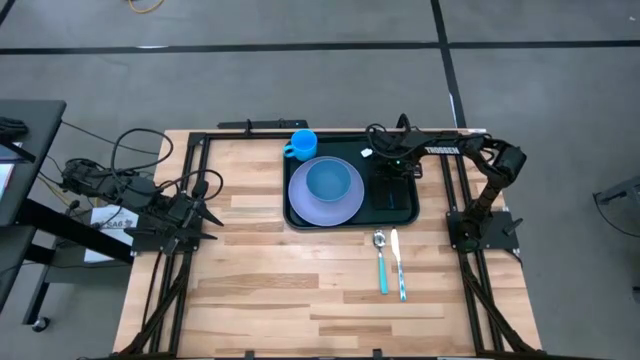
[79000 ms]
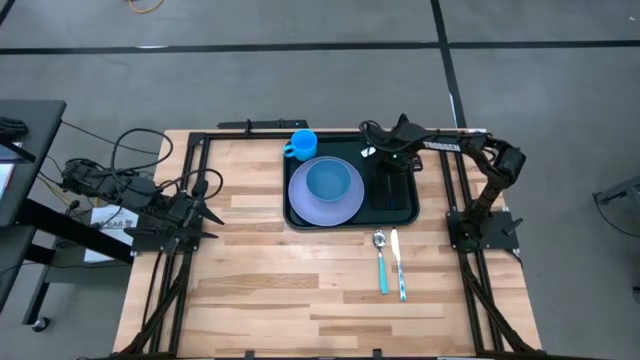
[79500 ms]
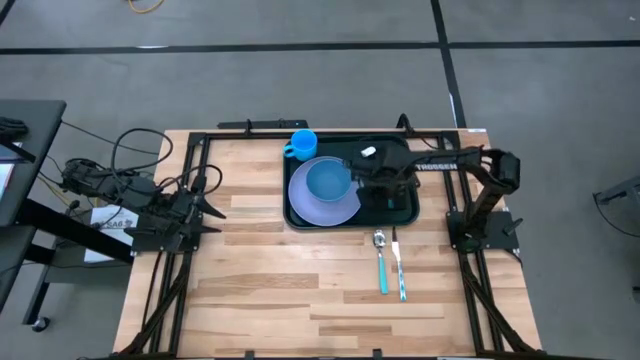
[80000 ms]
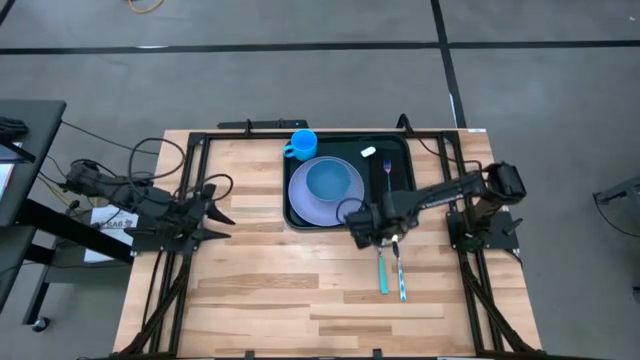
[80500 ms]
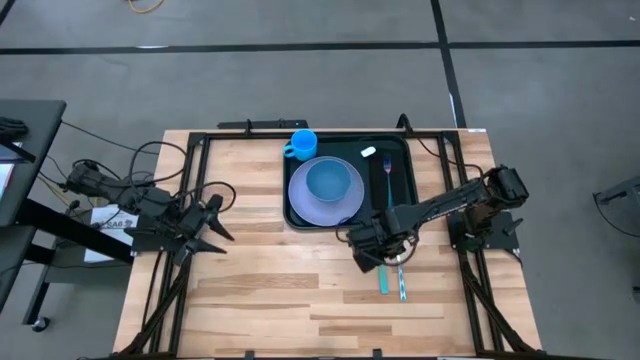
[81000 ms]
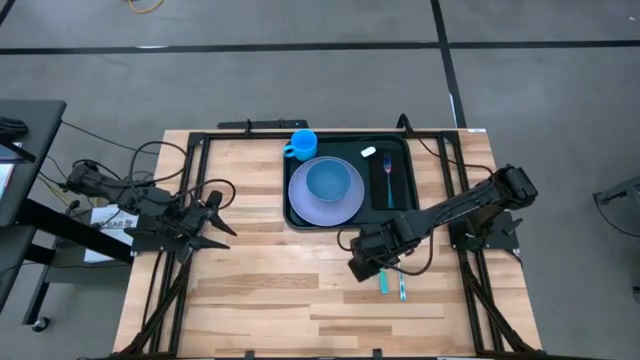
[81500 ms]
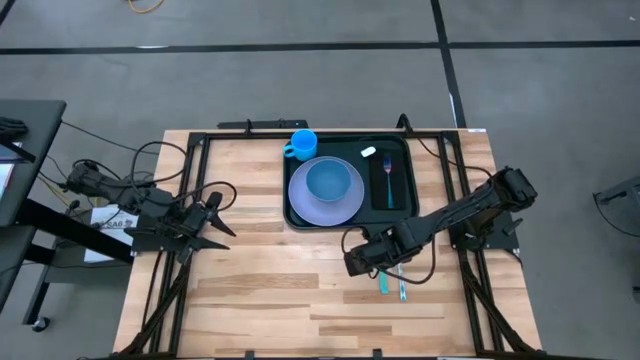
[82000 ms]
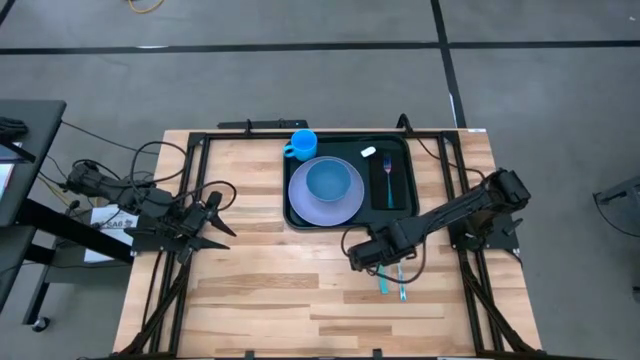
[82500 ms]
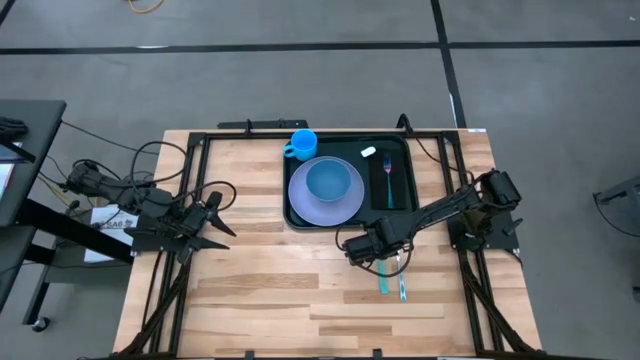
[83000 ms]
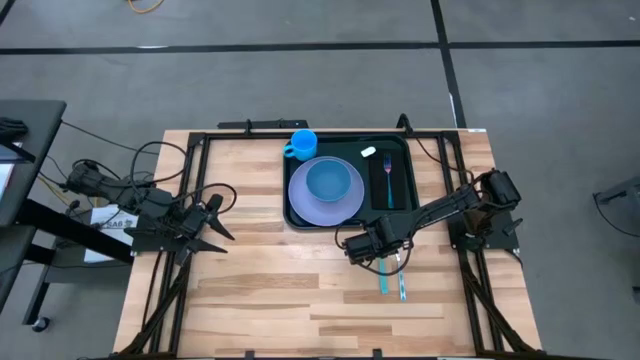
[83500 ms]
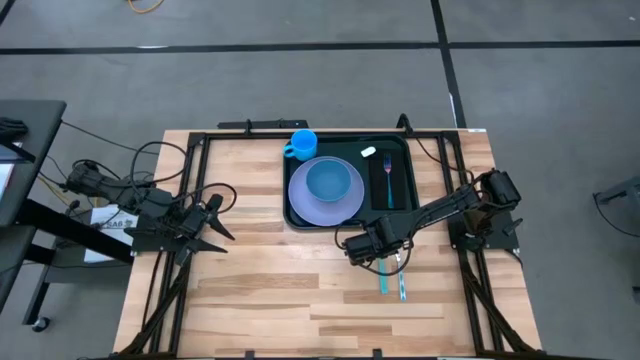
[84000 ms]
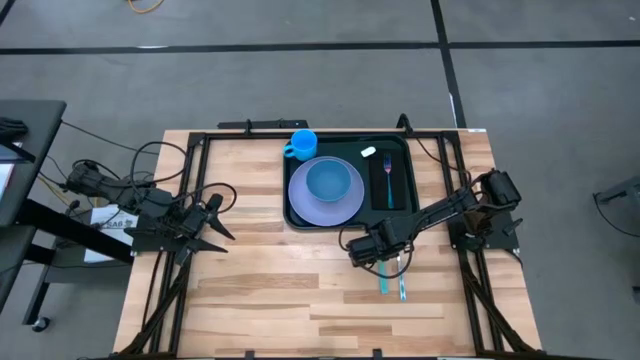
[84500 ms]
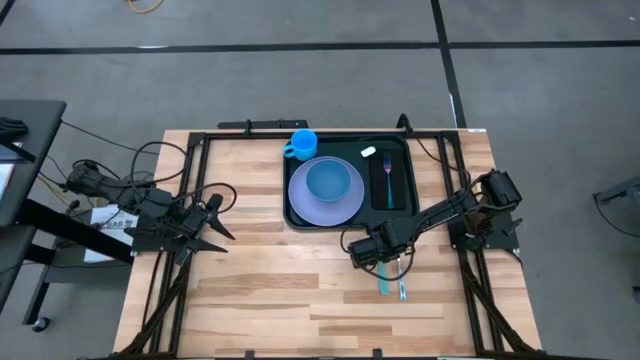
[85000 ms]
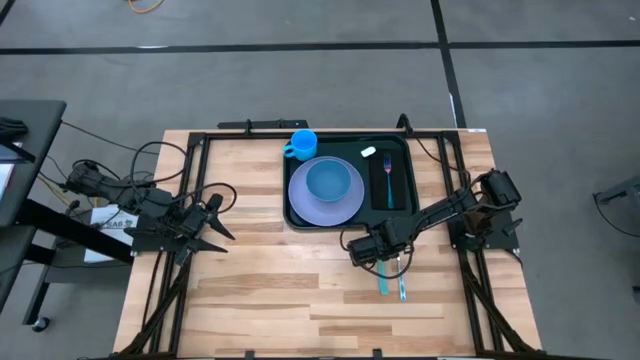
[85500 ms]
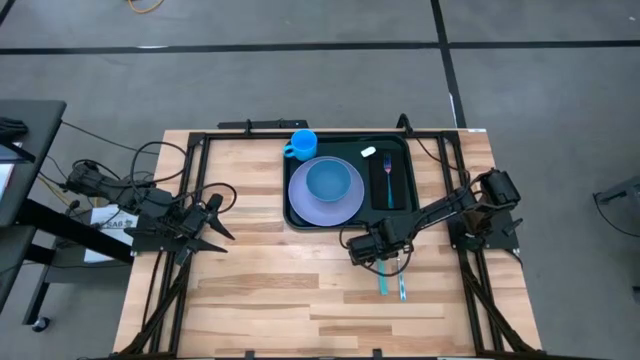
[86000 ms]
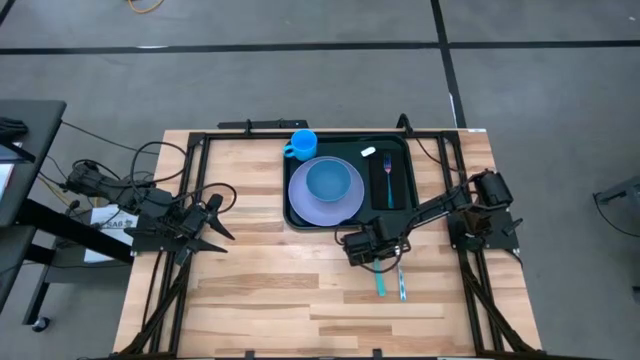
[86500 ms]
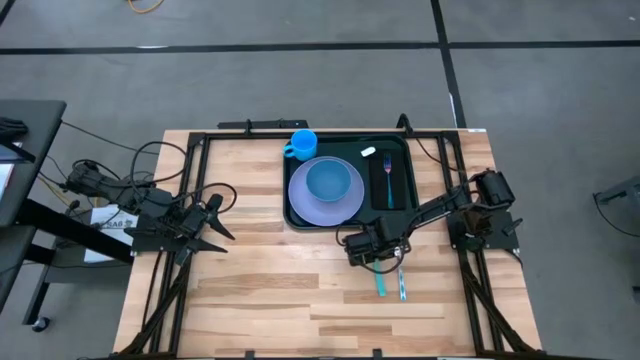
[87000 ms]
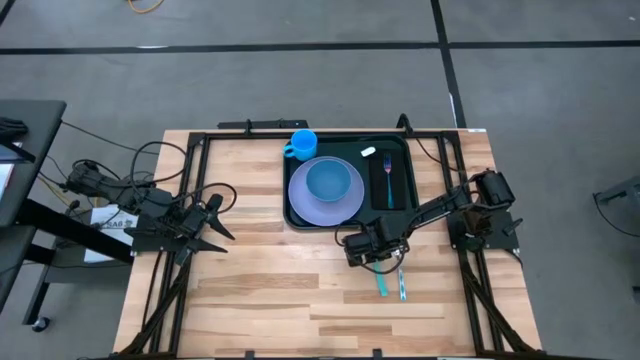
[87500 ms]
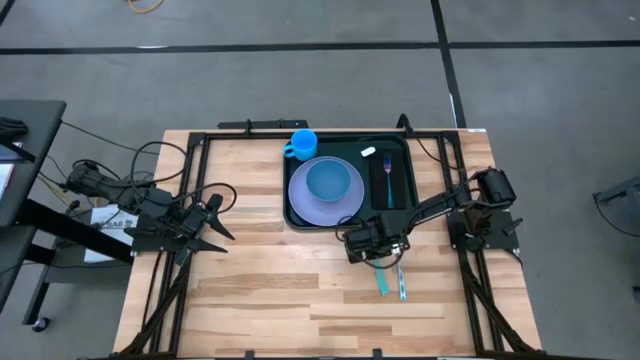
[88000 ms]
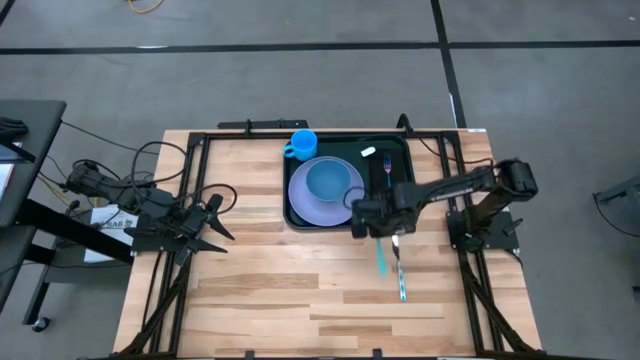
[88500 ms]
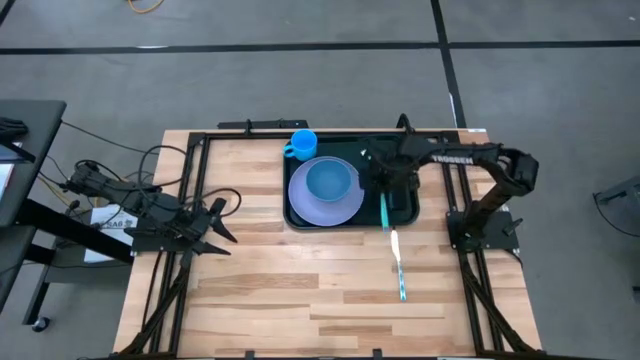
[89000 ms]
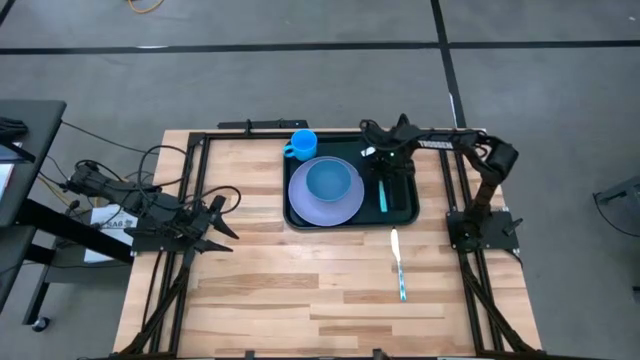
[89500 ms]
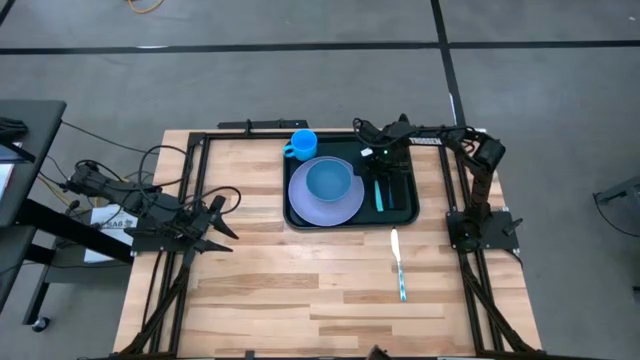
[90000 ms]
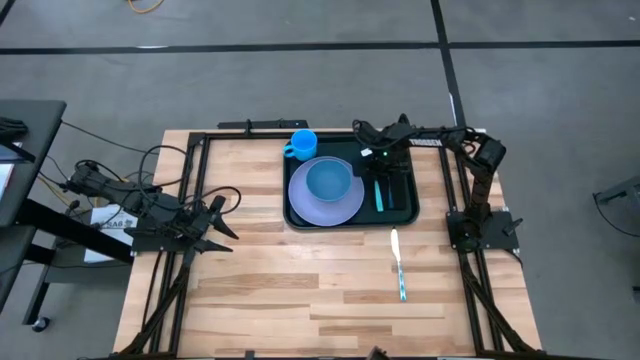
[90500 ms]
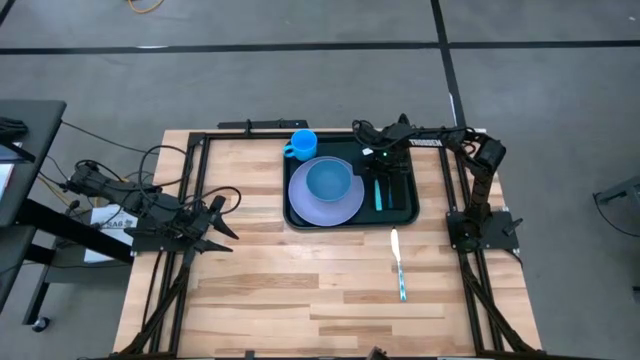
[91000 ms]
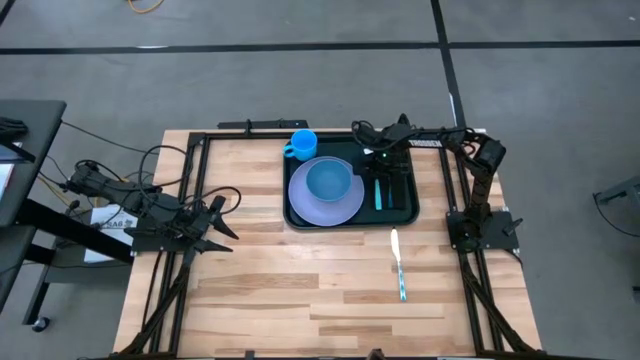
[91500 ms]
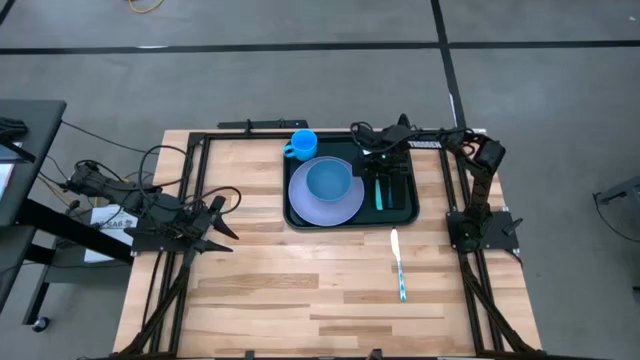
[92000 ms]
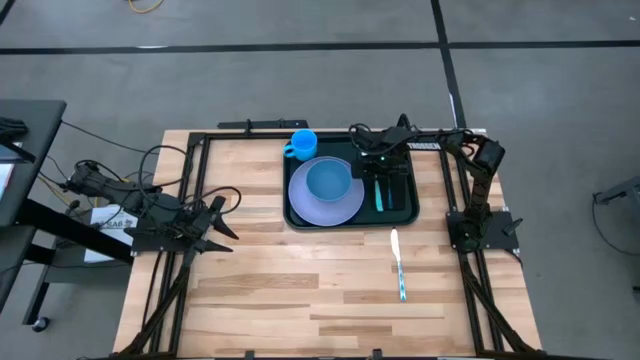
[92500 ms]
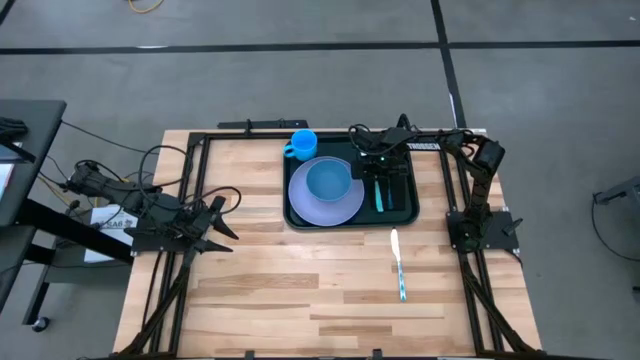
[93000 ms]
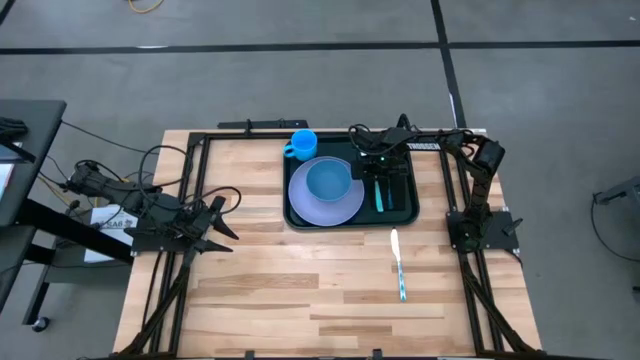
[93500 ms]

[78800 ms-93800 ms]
Task: Set up tray
Put the blue spoon on the black napkin

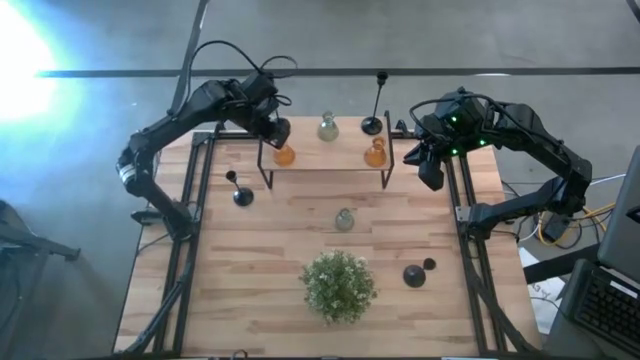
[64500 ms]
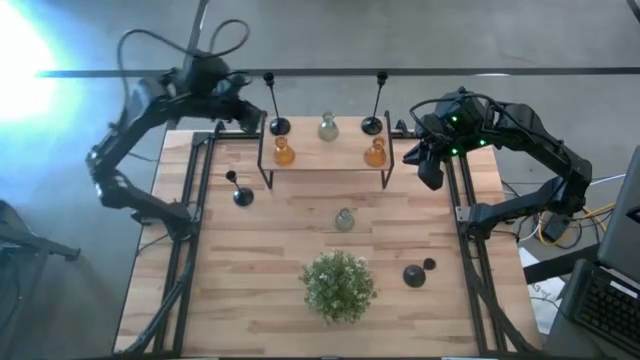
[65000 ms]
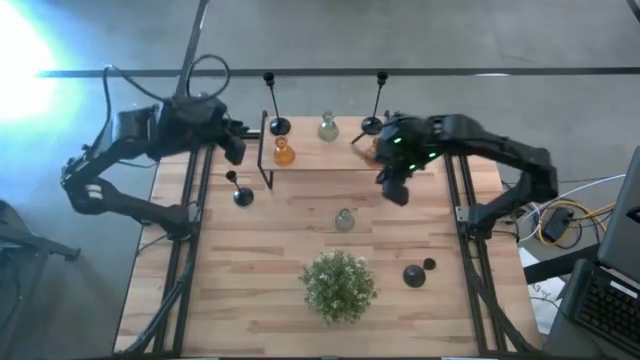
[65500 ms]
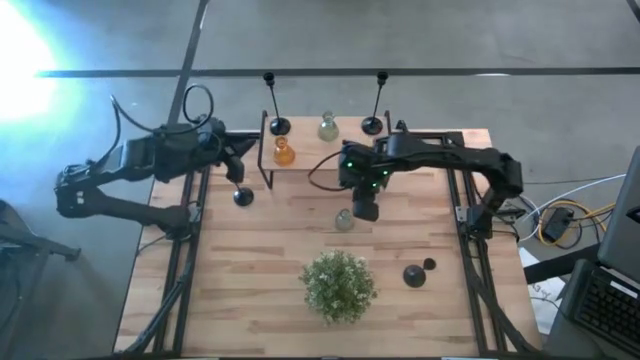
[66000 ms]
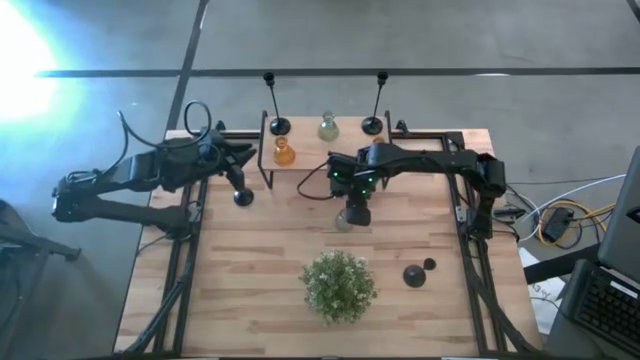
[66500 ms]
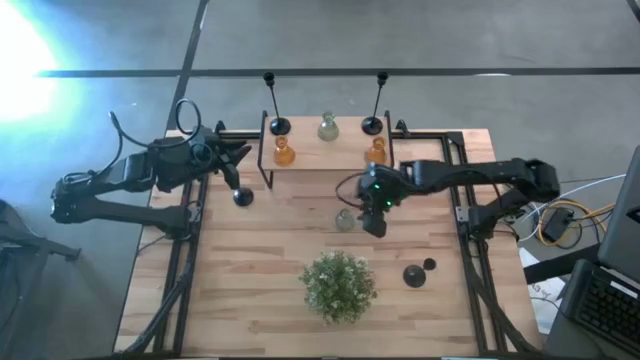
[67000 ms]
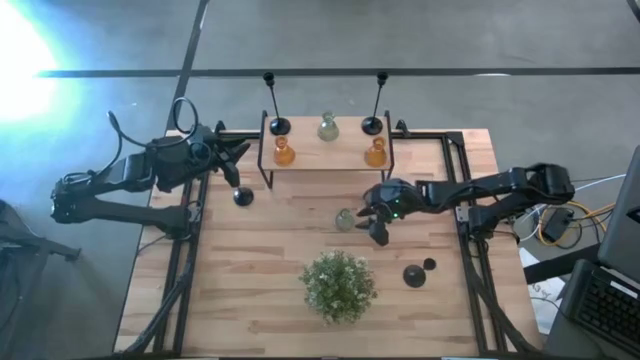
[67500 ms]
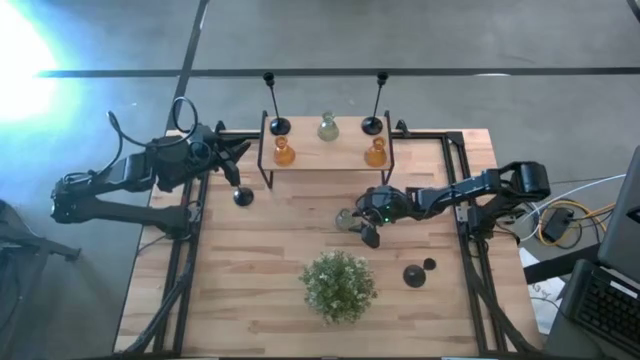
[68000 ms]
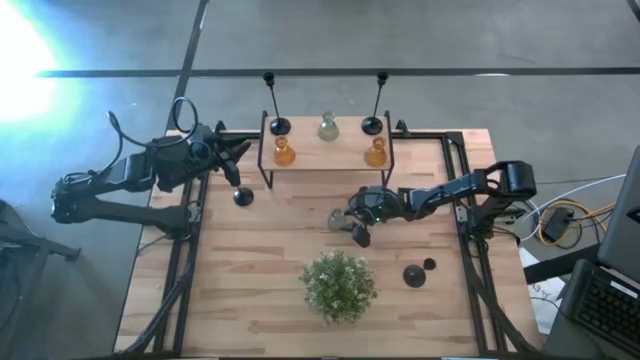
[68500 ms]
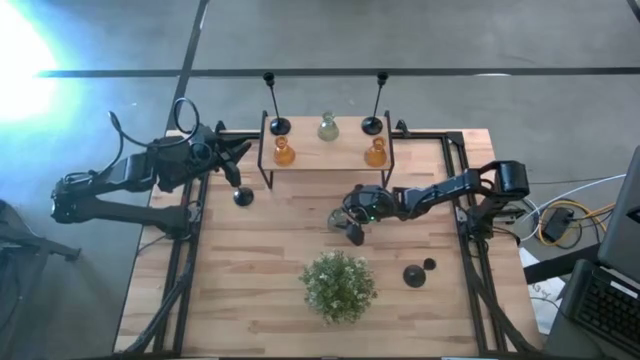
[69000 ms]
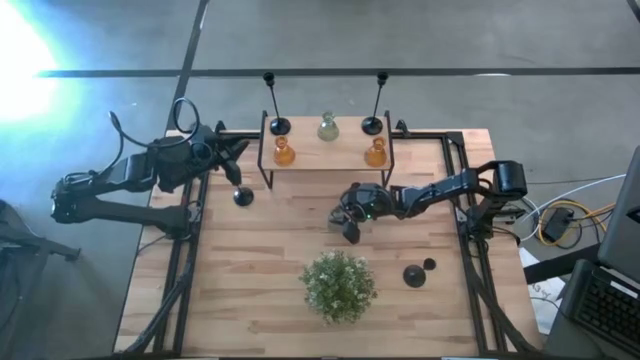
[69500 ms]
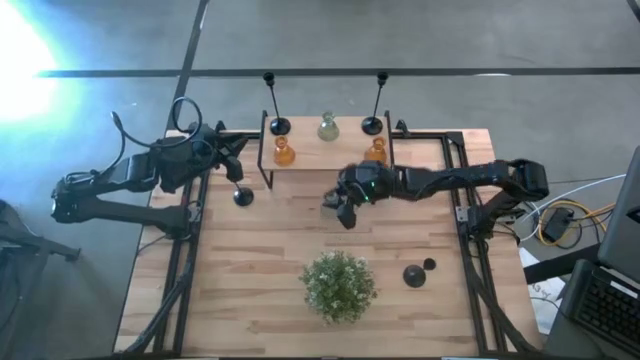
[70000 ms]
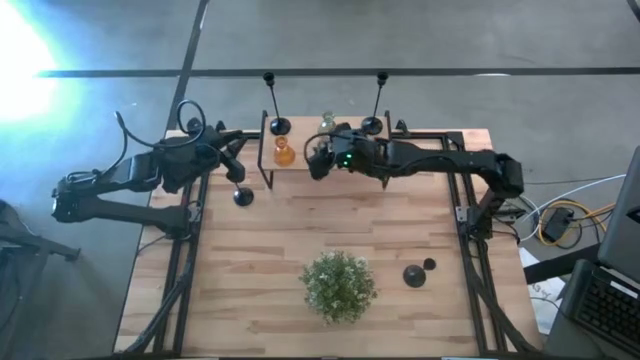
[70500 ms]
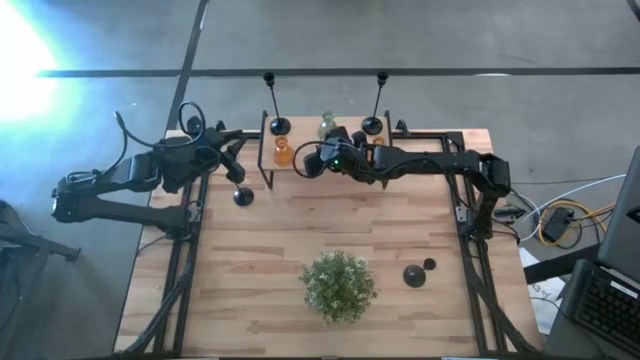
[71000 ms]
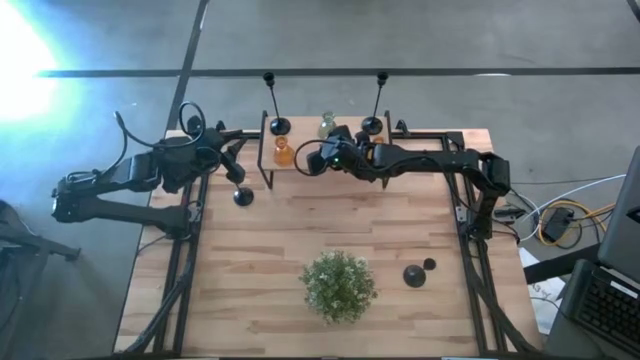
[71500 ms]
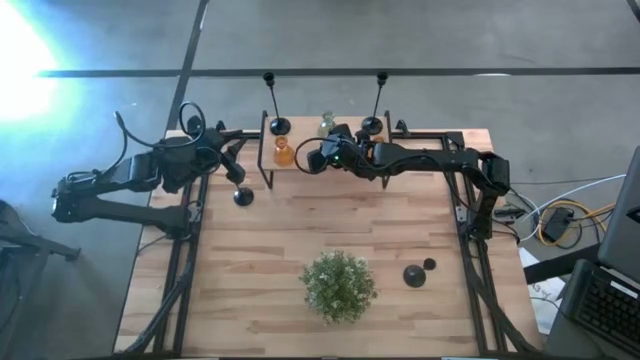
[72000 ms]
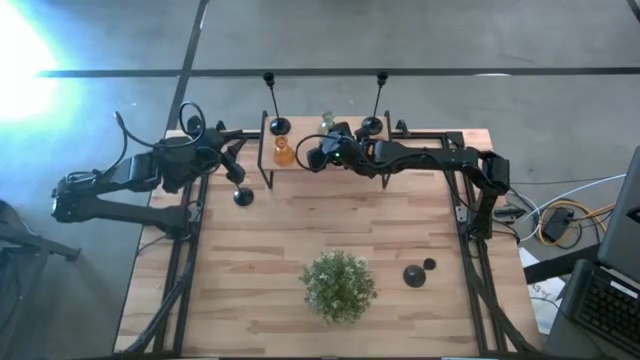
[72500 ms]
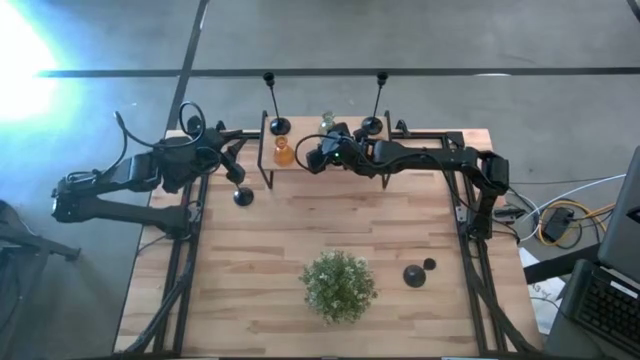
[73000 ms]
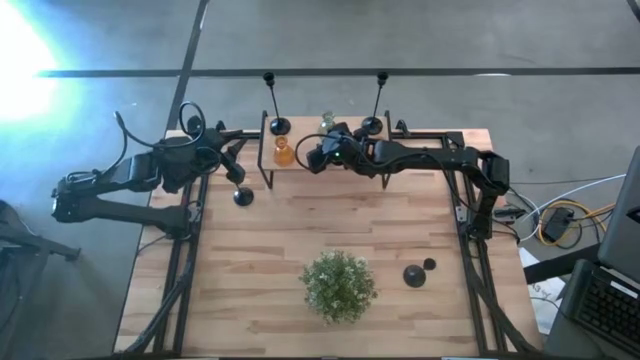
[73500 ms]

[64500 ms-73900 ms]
Task: Pick & Place candle stick holders
Put the green glass candle holder on the shelf
